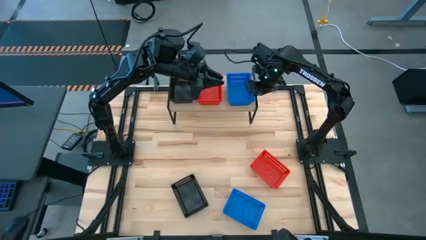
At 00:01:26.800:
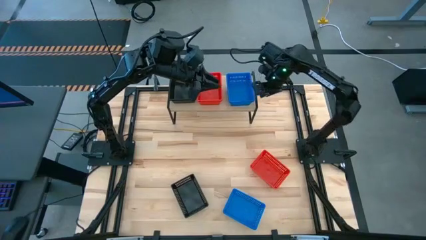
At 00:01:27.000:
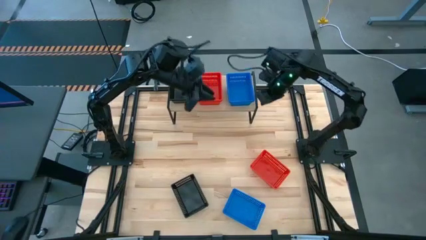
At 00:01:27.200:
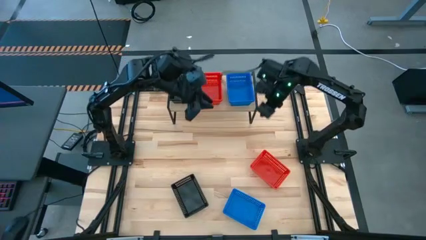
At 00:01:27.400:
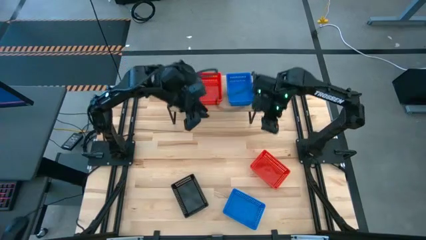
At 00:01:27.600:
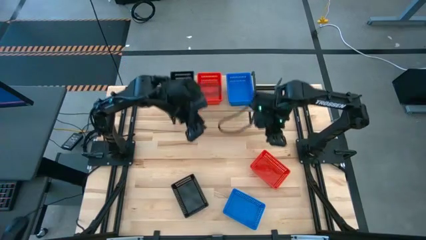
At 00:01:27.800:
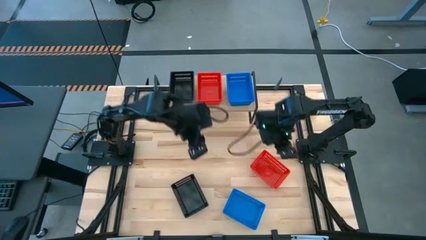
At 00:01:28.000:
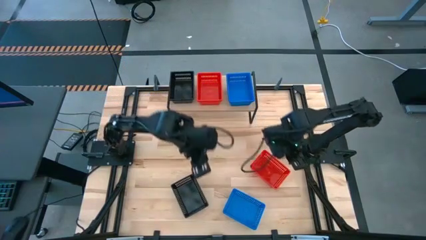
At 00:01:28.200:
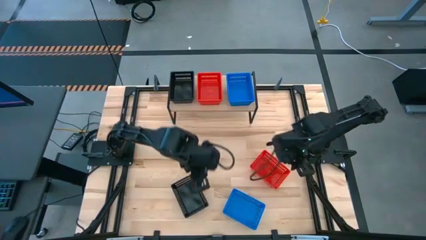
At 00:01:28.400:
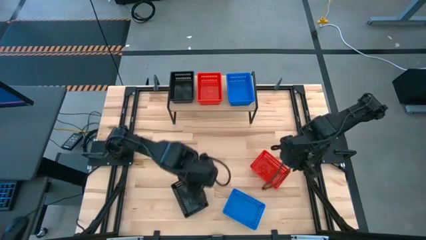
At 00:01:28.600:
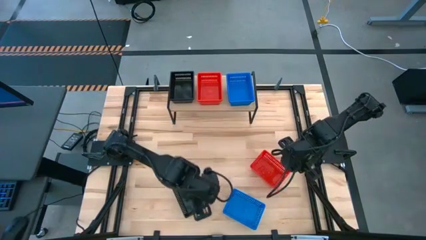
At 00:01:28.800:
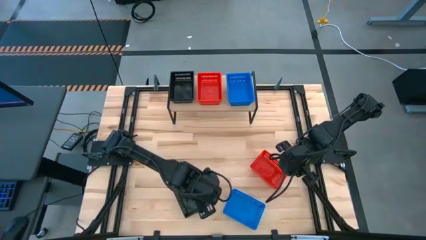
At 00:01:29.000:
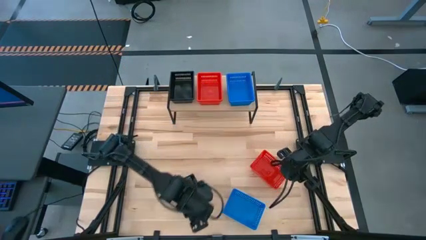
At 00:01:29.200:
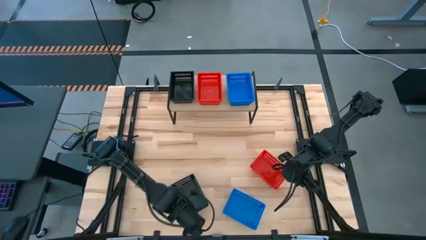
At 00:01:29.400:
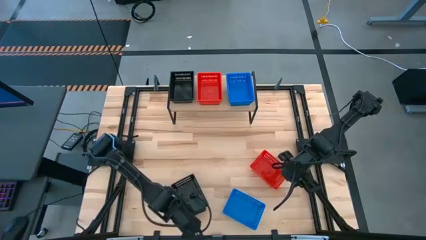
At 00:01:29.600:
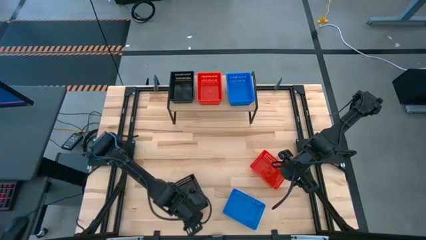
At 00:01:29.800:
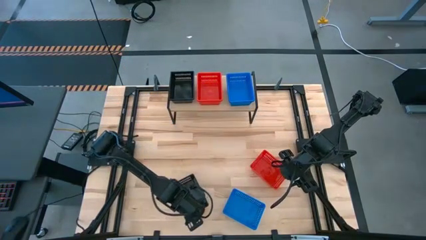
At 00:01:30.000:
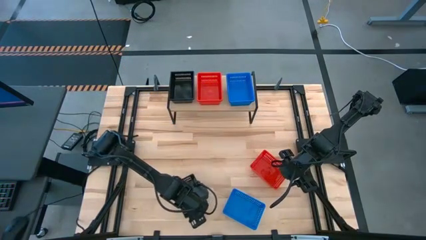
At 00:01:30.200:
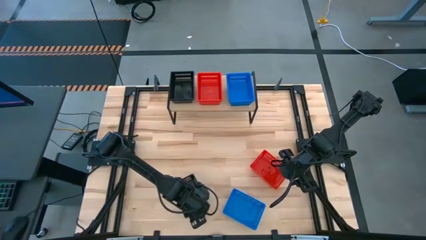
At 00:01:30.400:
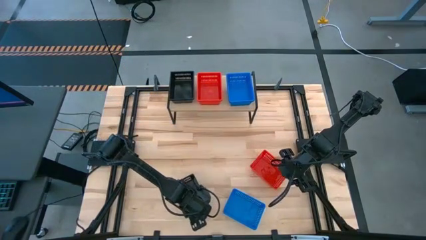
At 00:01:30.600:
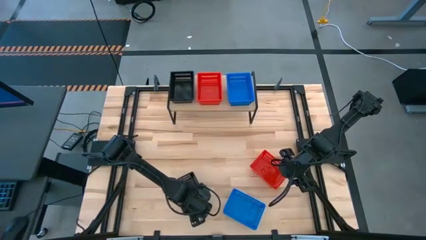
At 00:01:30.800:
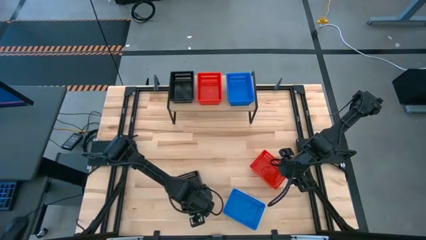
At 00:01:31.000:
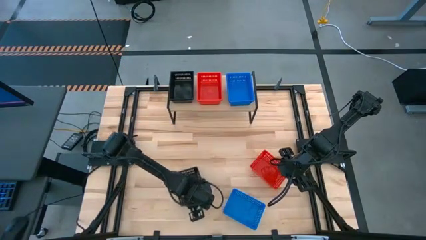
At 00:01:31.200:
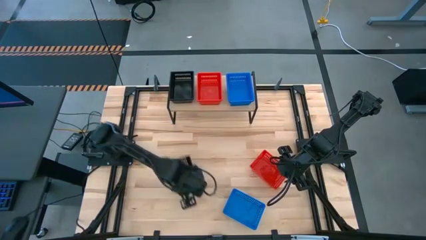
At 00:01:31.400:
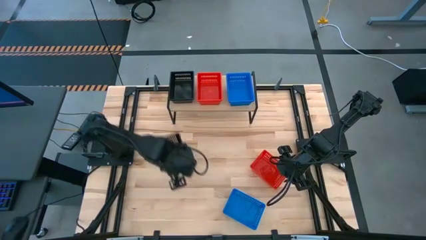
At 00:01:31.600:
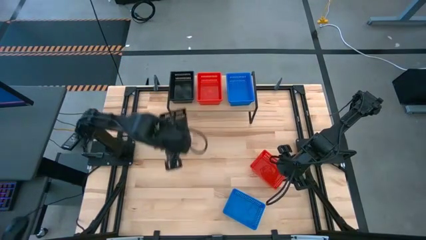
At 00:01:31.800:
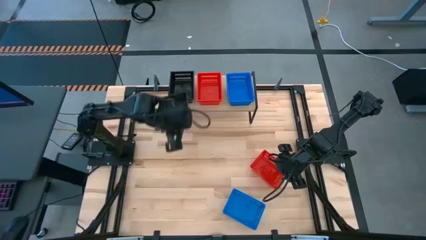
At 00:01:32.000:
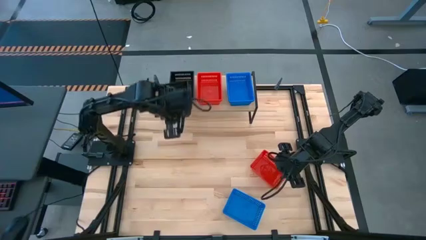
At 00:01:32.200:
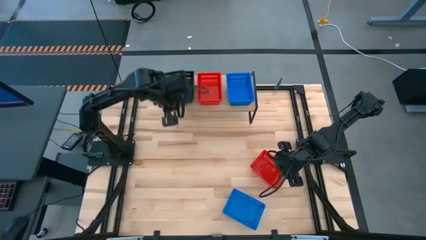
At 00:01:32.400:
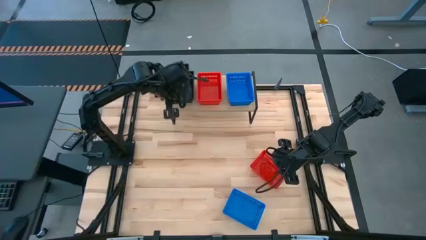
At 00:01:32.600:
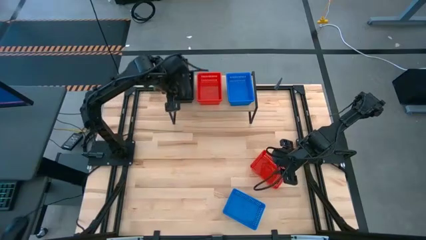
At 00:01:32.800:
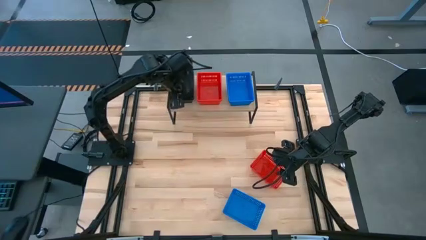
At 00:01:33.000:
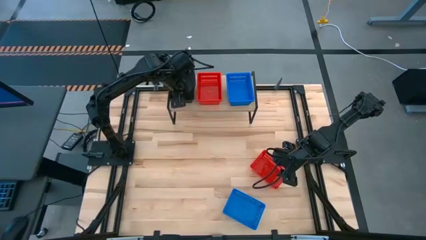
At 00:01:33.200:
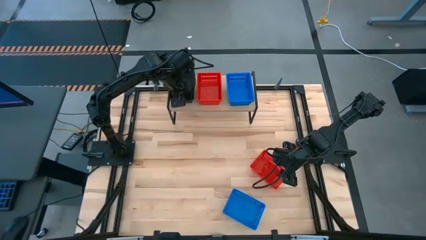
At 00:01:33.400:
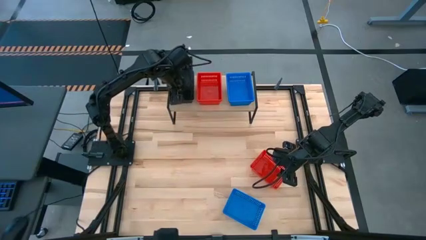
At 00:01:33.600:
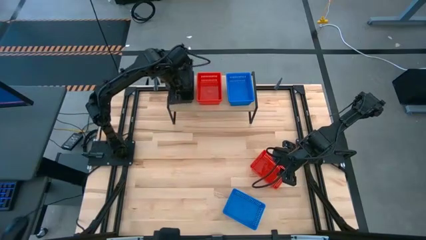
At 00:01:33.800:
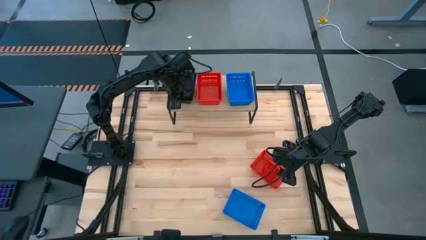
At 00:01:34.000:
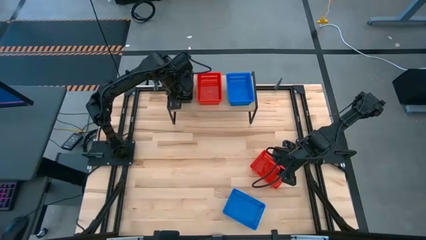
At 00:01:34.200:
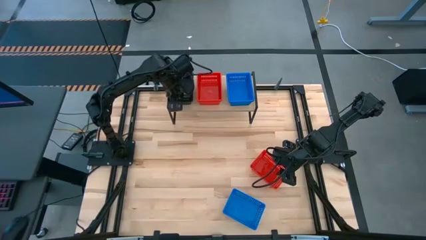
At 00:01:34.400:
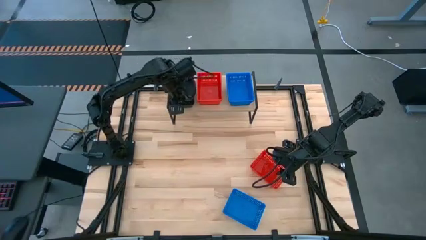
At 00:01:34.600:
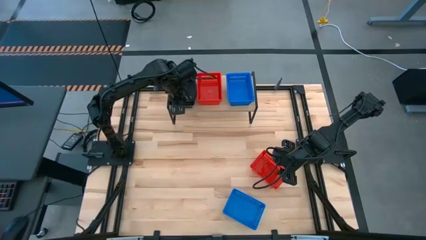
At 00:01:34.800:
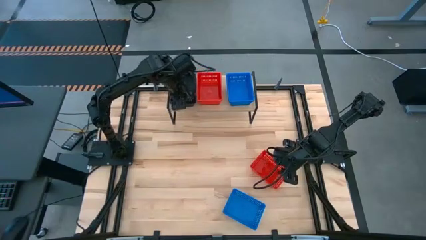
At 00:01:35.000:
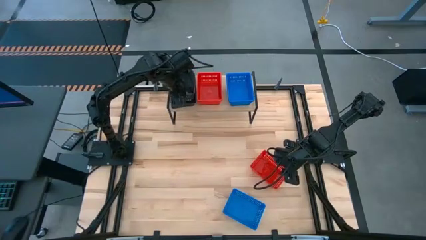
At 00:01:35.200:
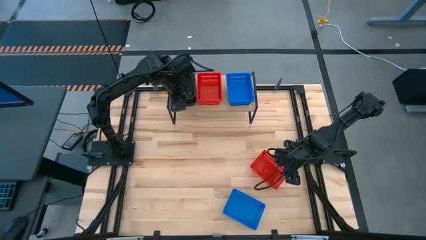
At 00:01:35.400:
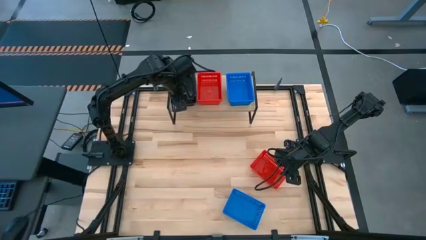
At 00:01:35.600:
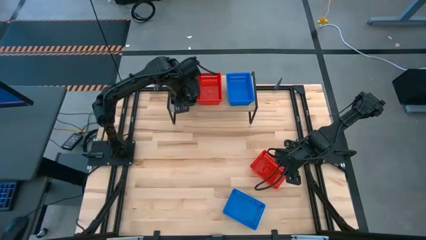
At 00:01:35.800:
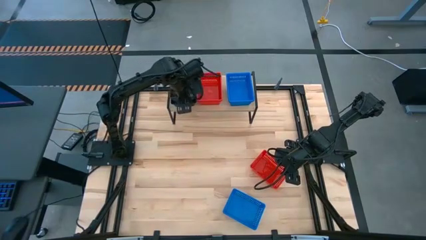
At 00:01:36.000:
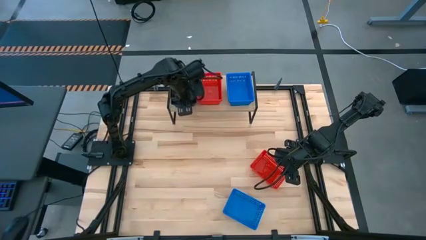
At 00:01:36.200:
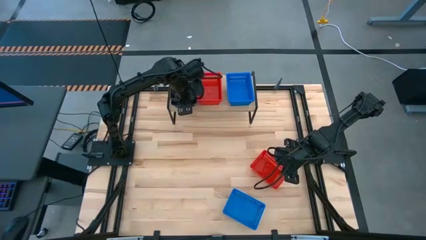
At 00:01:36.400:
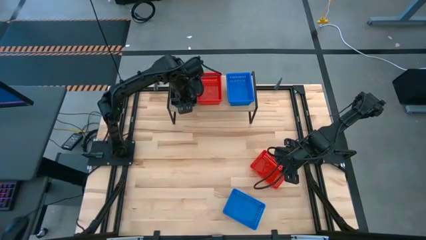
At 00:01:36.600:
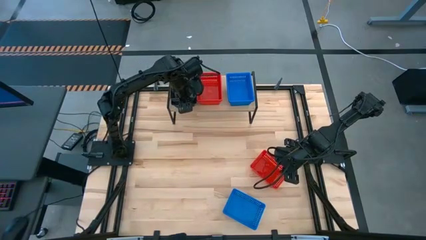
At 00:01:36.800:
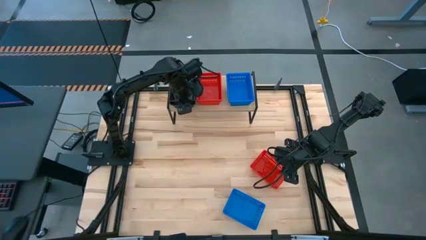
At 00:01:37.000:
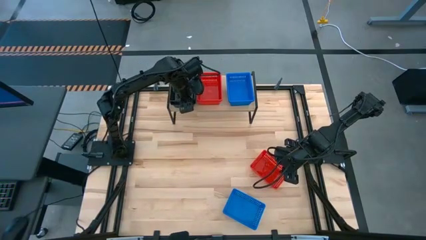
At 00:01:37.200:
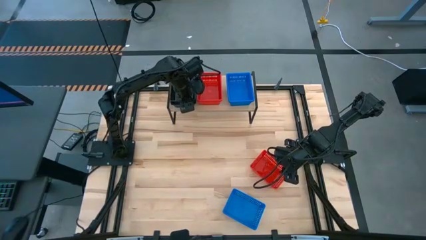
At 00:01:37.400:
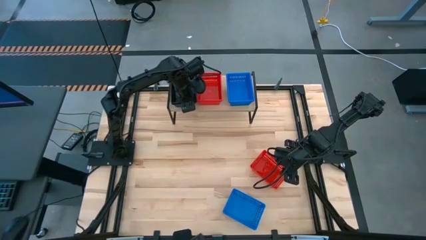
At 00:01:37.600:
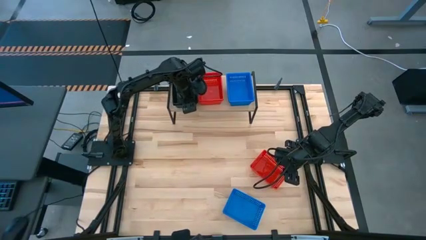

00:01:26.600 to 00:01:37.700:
Task: Stack baskets on shelf by color
Stack the black bin on the stacked black bins on the shelf

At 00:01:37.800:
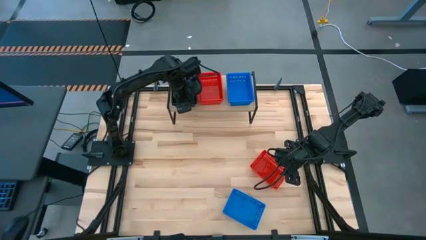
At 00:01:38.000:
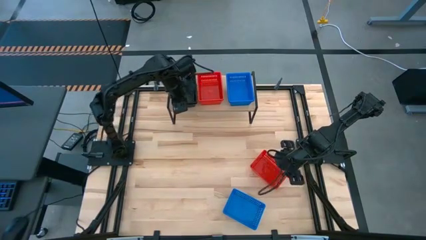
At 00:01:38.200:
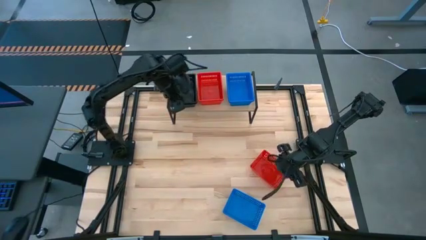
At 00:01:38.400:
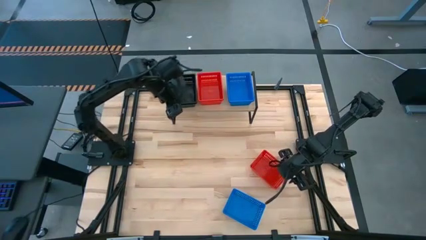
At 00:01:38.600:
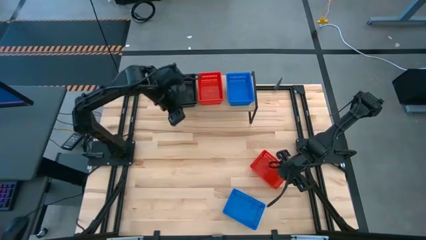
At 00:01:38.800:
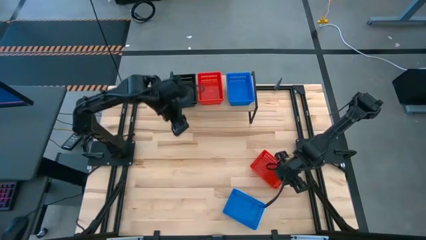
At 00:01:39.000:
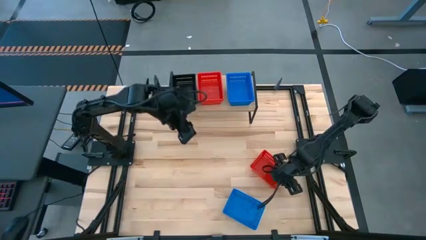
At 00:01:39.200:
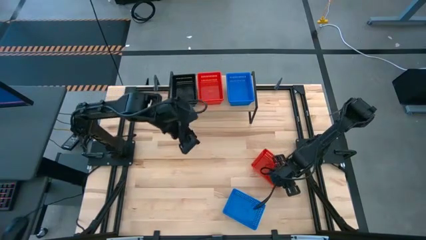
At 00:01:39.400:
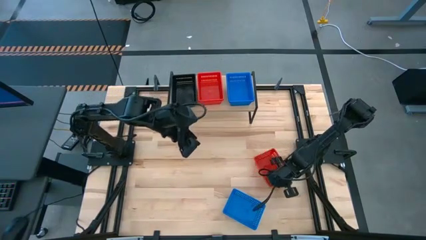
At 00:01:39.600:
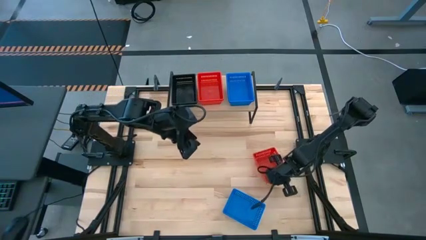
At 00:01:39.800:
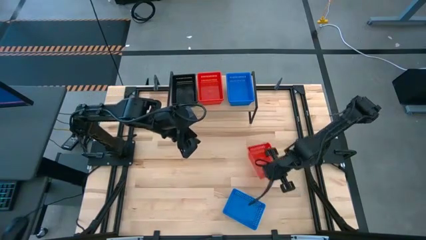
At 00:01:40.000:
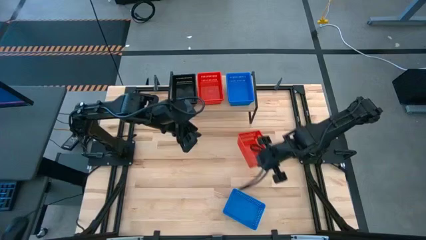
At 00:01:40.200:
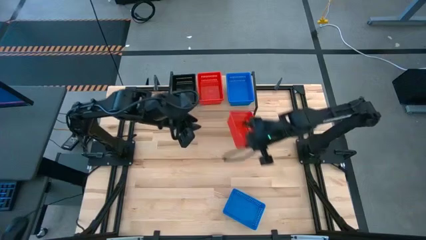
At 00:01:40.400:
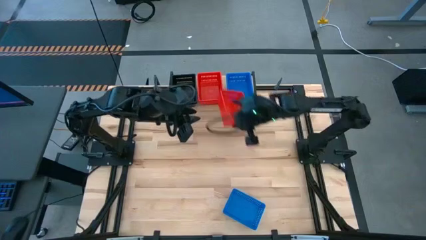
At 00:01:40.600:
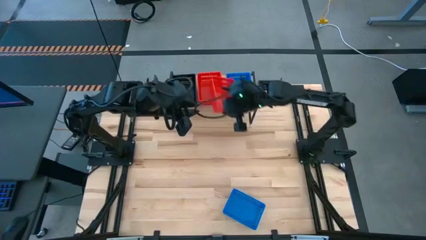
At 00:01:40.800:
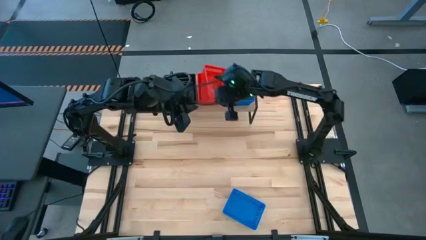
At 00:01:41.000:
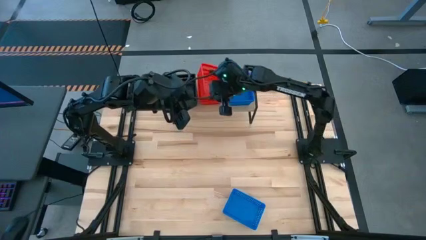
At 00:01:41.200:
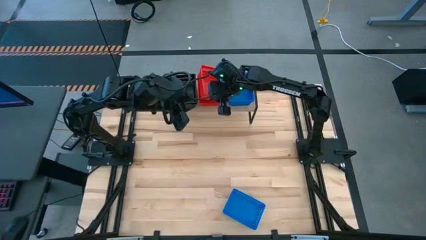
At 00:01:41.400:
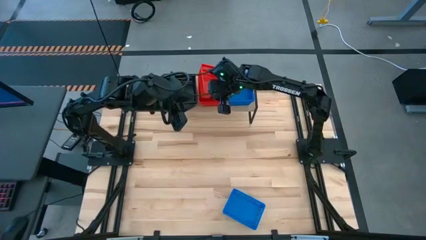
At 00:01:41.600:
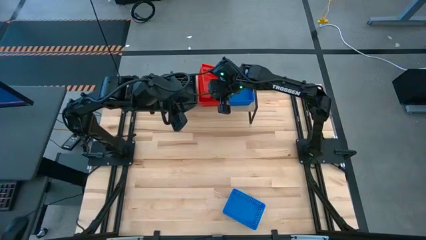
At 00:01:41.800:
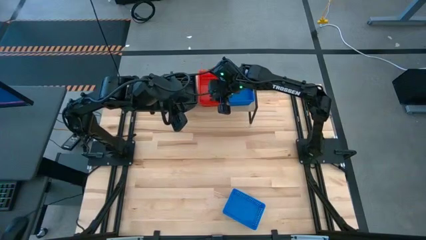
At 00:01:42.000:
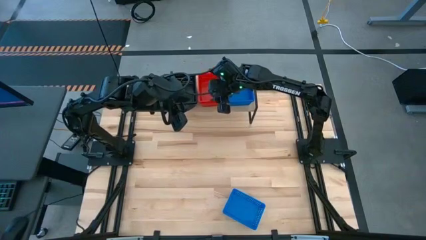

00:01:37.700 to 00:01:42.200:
Stack the red bin on the stacked red bins on the shelf
